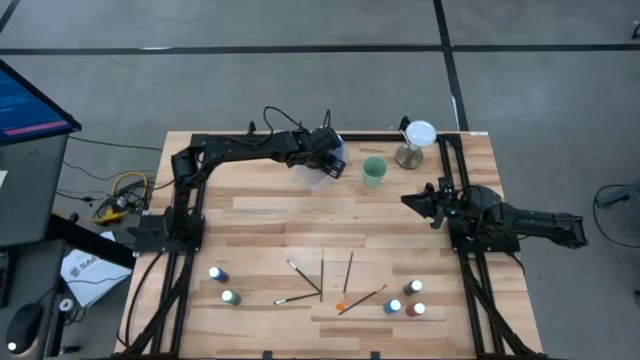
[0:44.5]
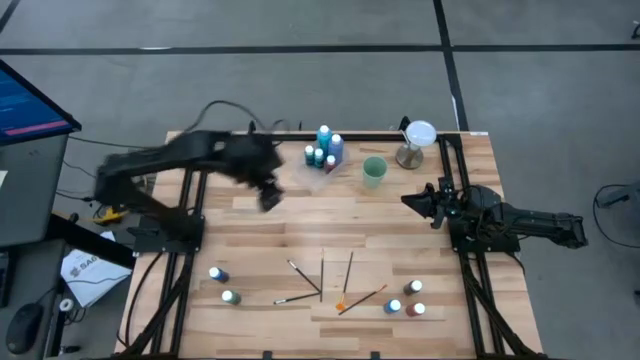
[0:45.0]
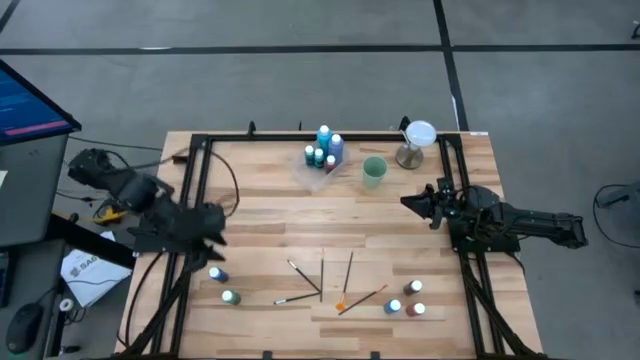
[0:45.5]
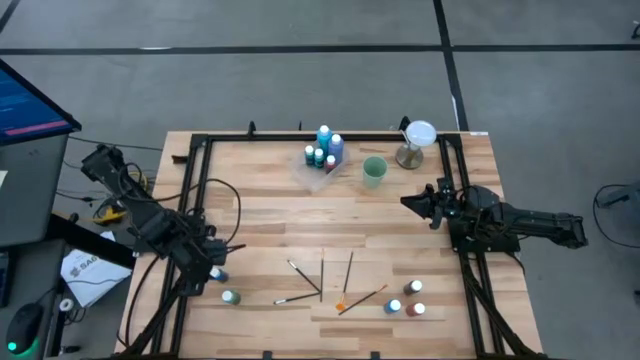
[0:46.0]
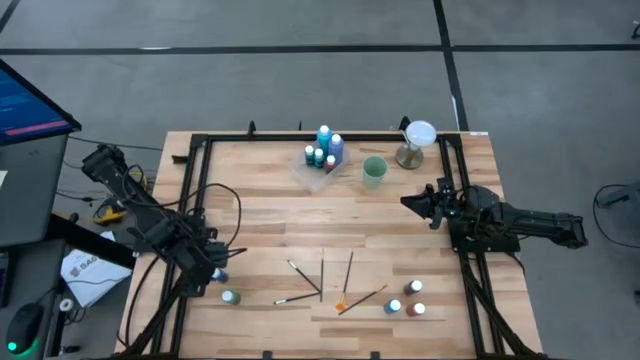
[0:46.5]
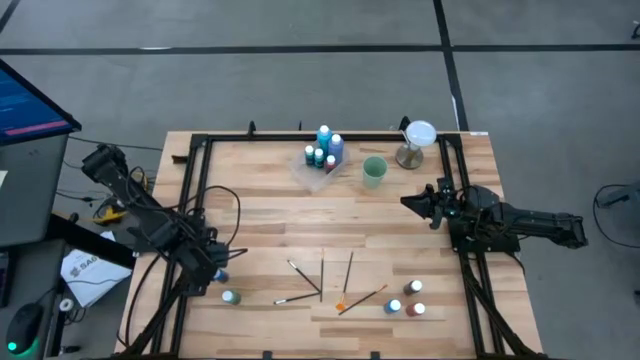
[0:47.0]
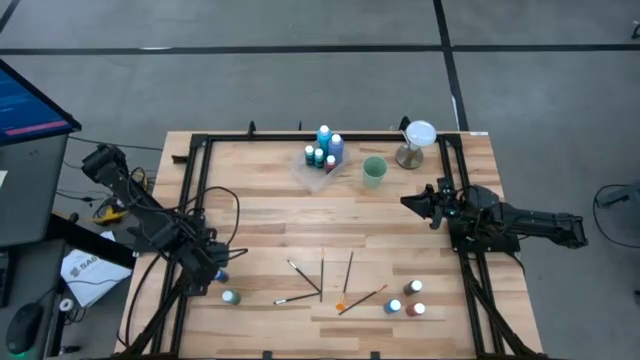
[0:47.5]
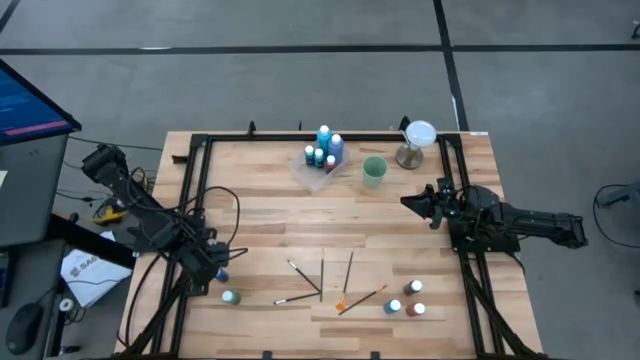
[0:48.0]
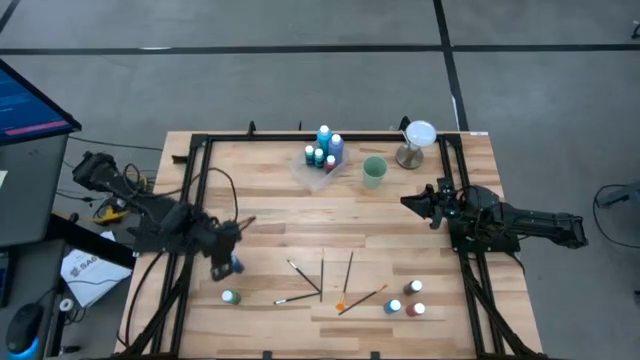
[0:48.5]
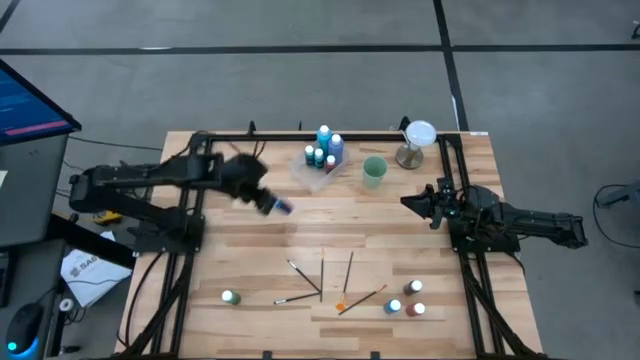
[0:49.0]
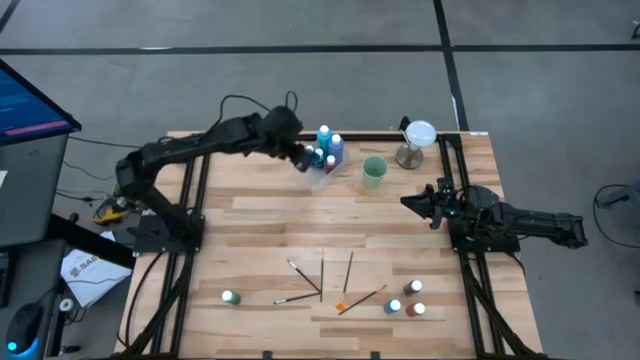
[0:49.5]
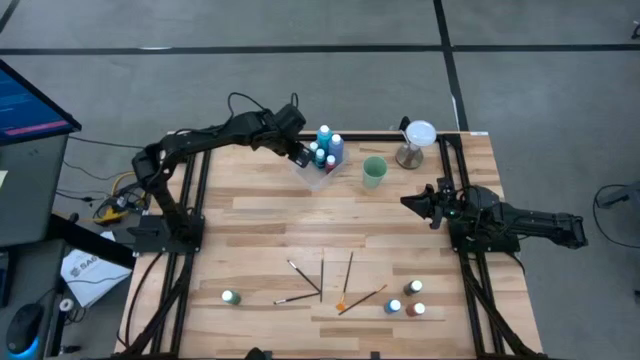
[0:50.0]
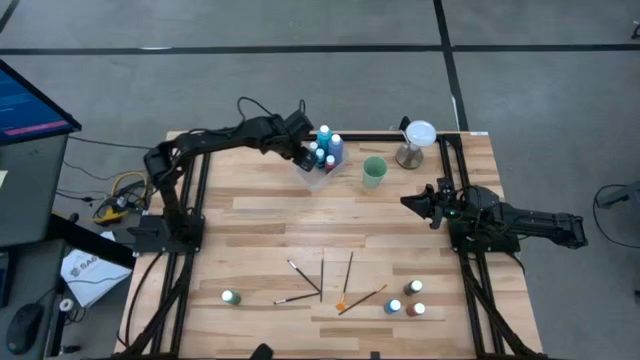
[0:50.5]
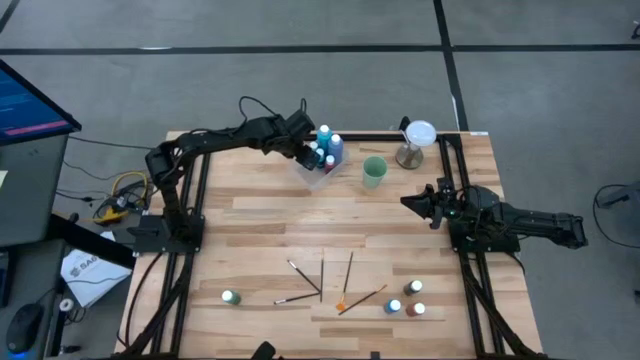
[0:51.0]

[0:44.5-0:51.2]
Task: Pick & Place Paint Supplies
Put the small blue paint bottle into the transparent bin

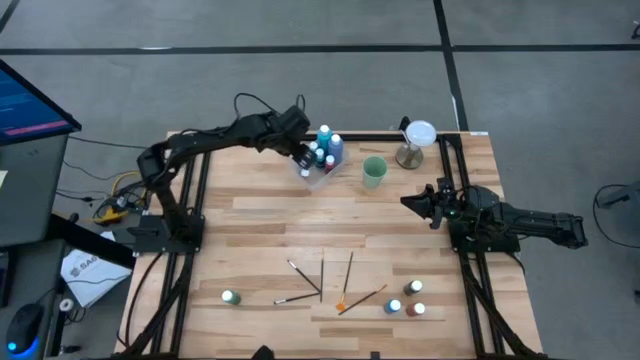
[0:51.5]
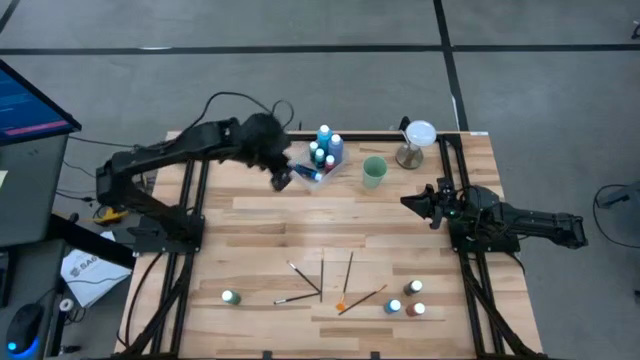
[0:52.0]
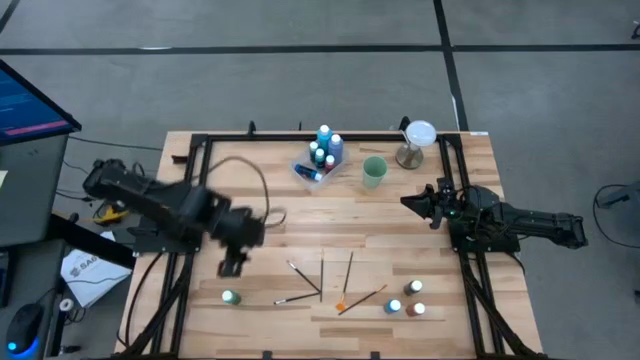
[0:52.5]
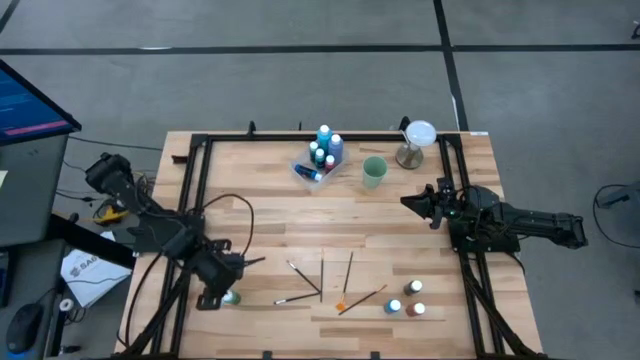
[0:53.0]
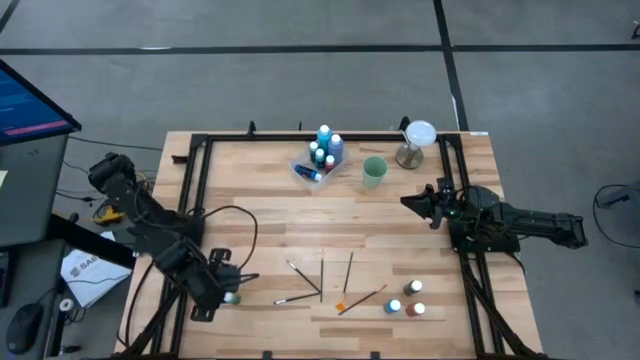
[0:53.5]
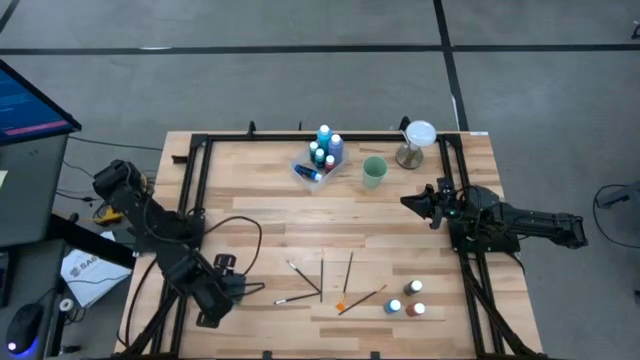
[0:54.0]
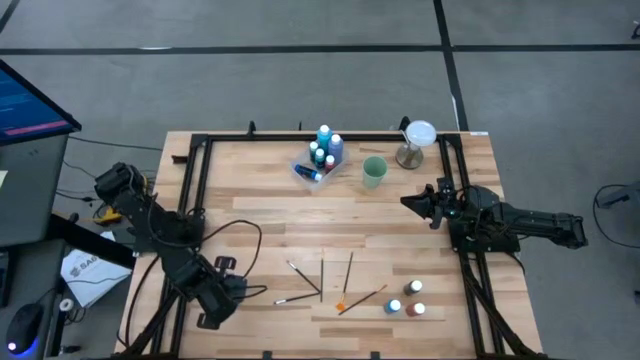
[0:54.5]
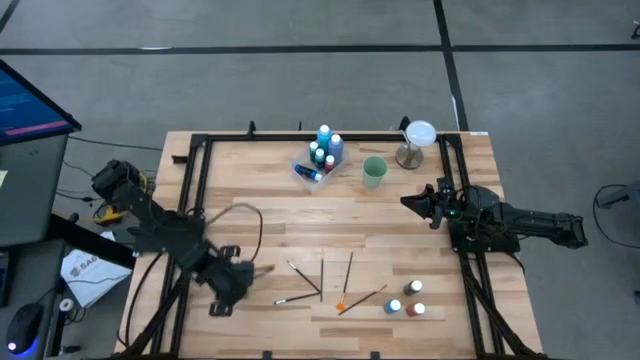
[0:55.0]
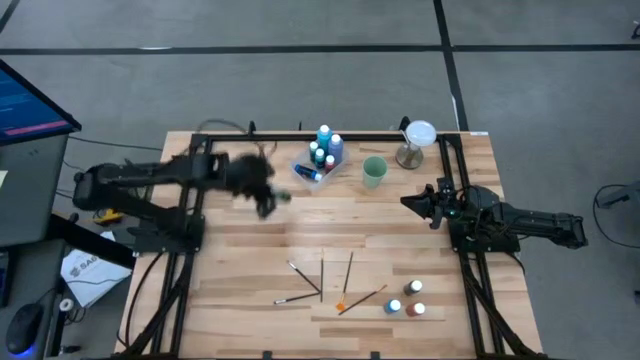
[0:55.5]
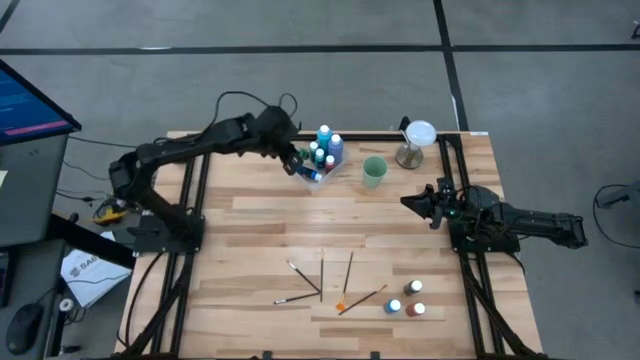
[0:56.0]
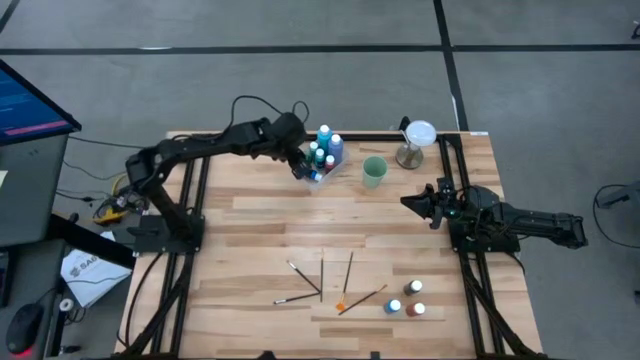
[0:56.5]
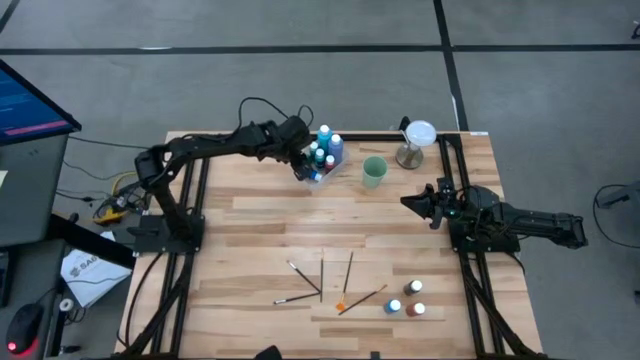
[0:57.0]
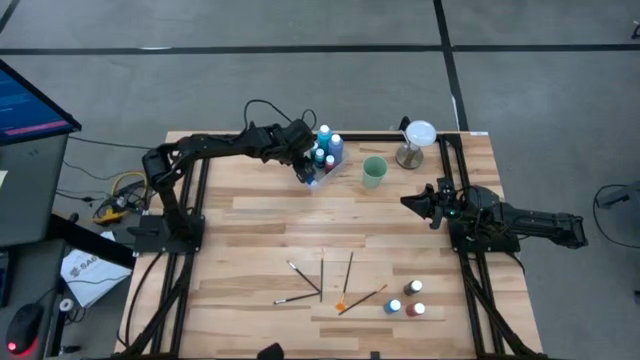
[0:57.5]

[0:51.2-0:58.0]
Put the small green paint bottle into the transparent bin

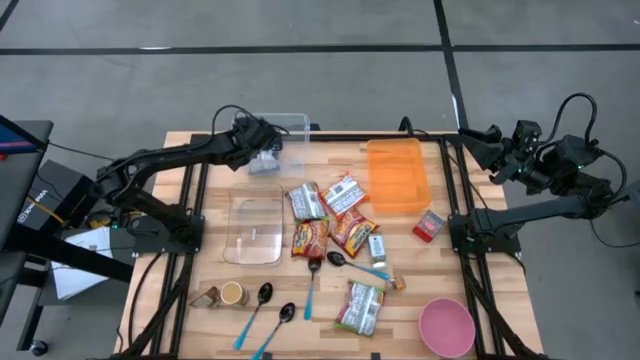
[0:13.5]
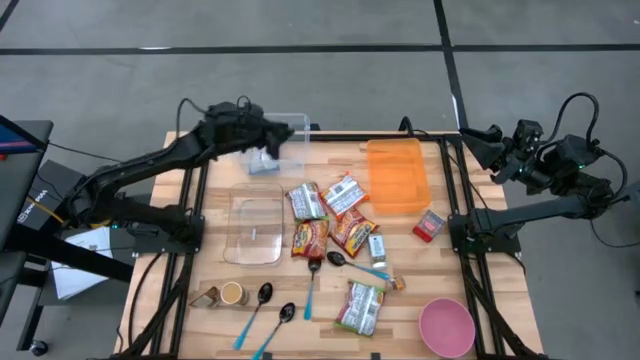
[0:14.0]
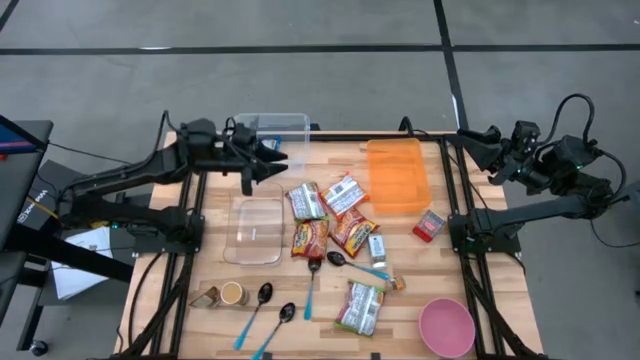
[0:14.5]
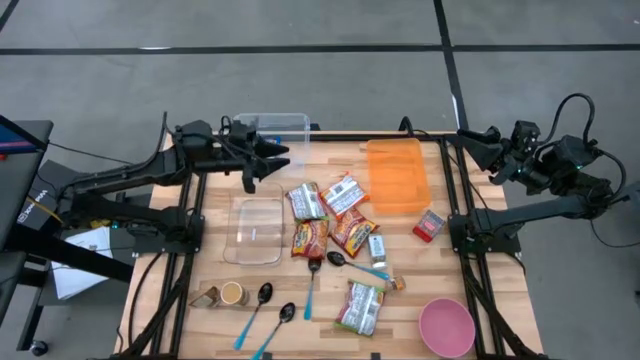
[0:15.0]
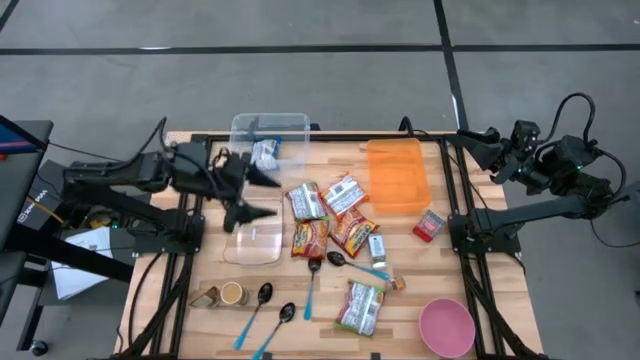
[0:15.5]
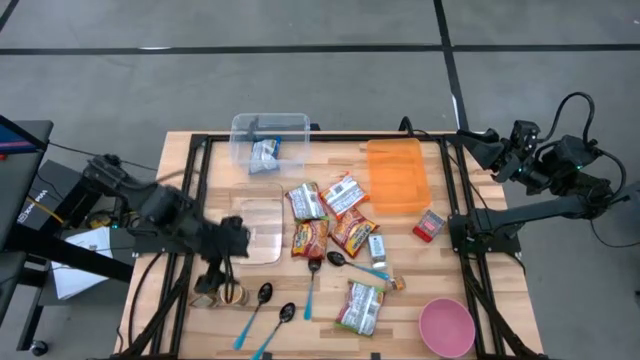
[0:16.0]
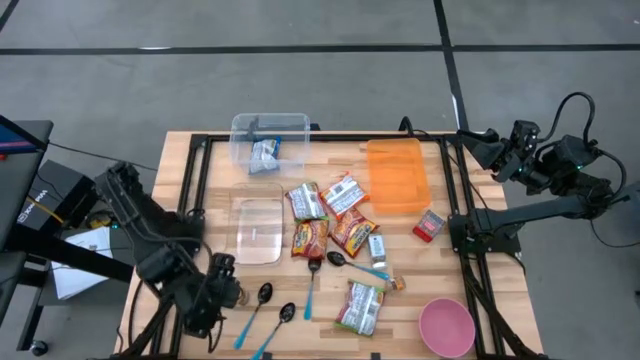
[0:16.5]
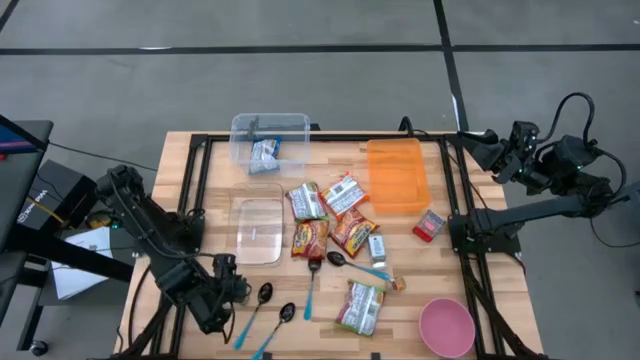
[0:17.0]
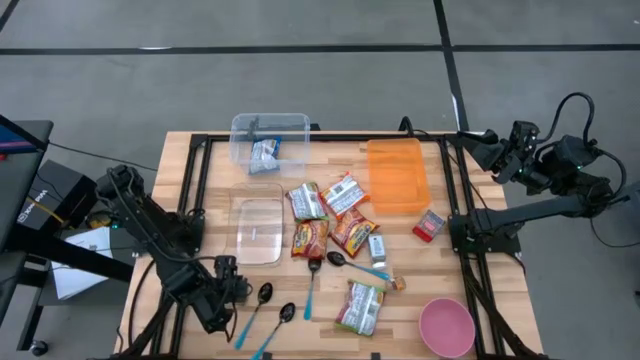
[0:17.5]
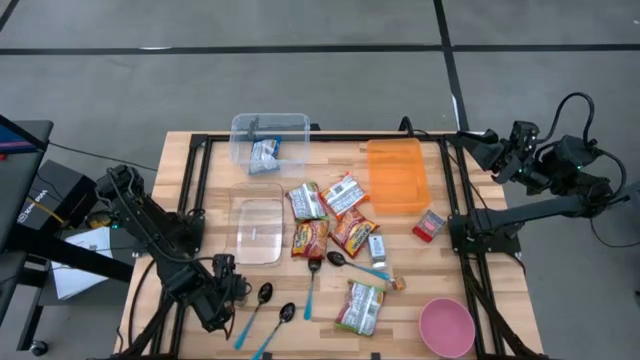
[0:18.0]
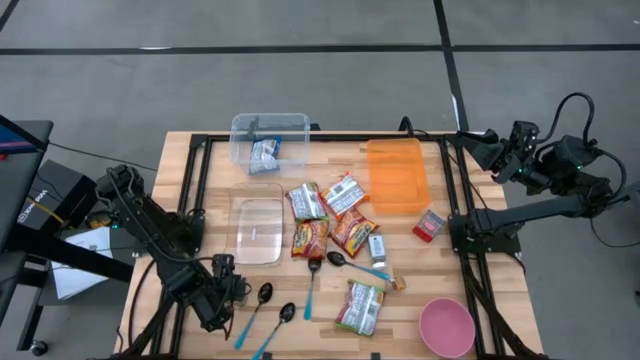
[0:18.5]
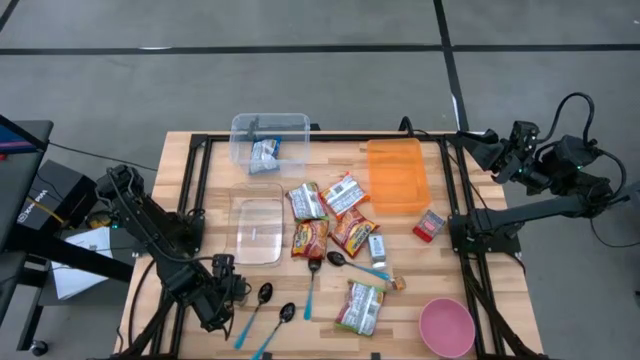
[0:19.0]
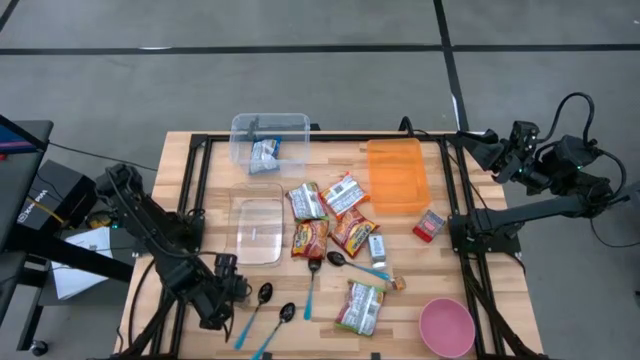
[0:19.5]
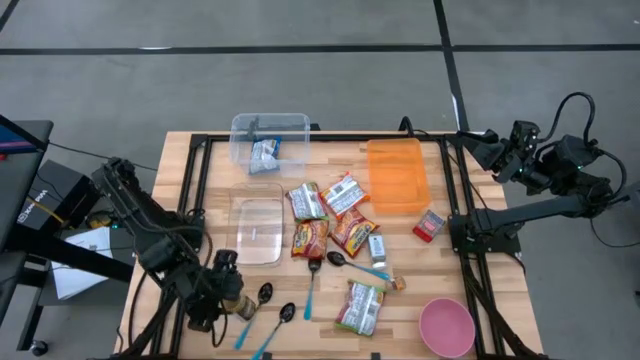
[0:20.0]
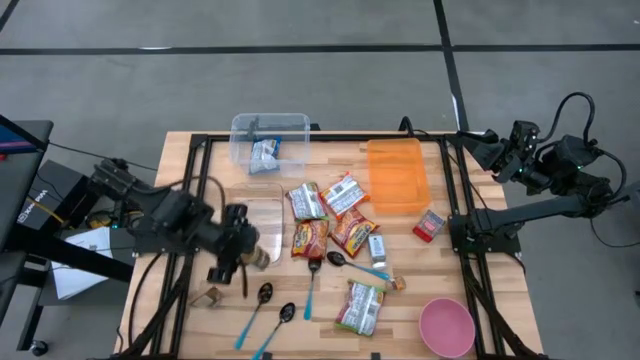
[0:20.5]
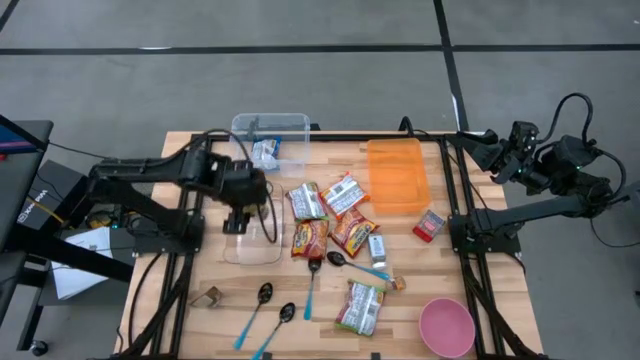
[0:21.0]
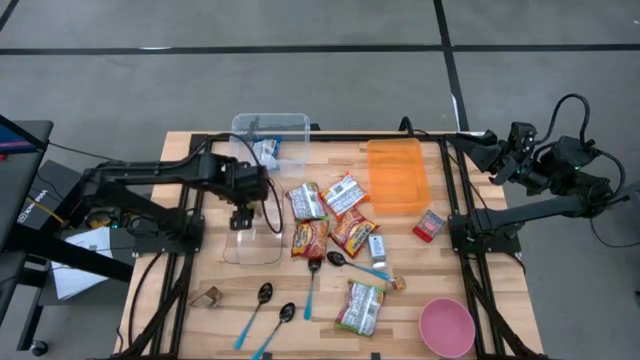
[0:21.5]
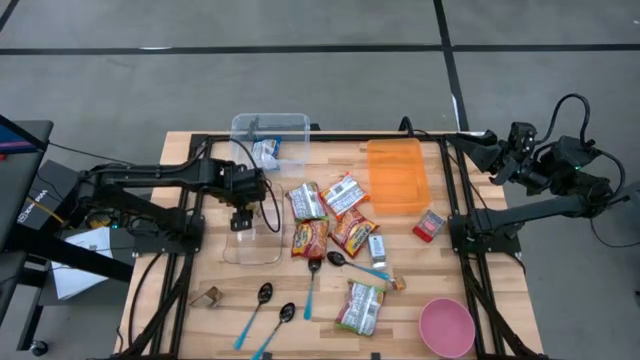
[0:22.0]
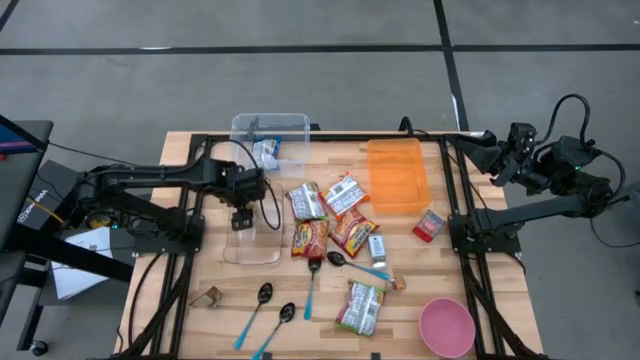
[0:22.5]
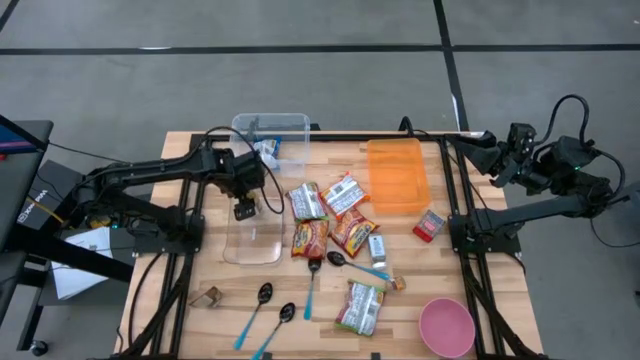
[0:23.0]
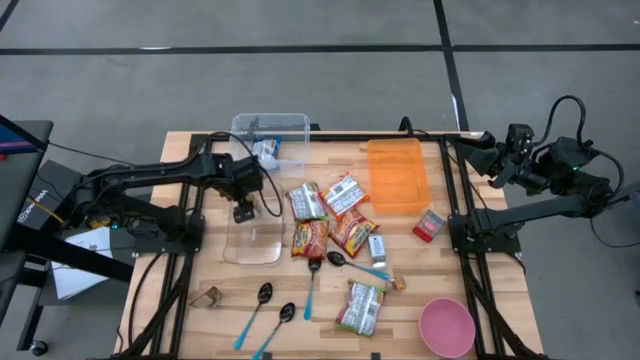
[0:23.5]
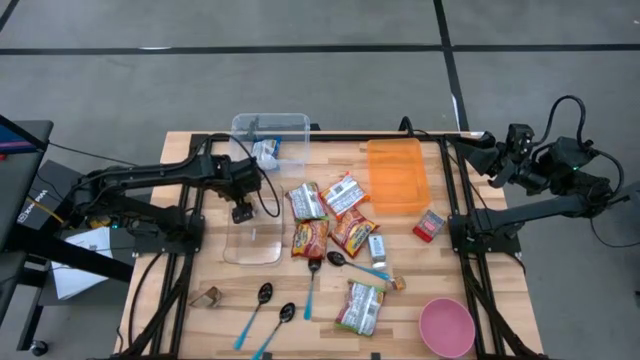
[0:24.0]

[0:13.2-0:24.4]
Task: Pick & Place Food Item
Put the golden seasoning bottle into the transparent bin
